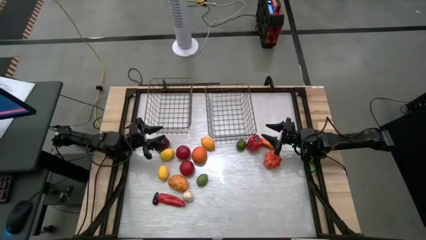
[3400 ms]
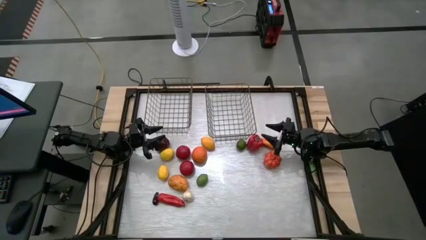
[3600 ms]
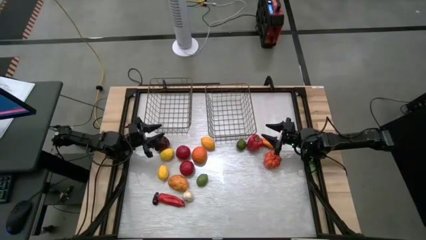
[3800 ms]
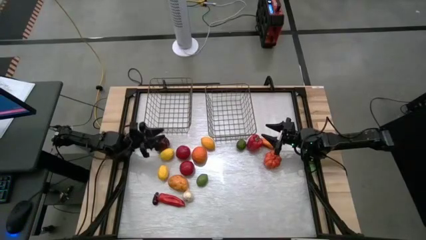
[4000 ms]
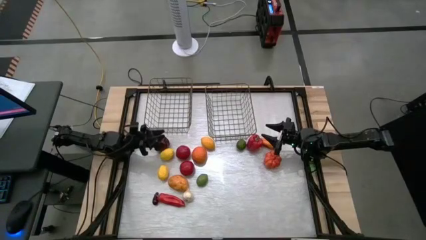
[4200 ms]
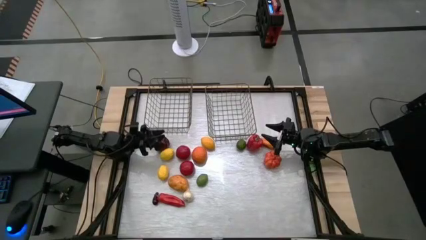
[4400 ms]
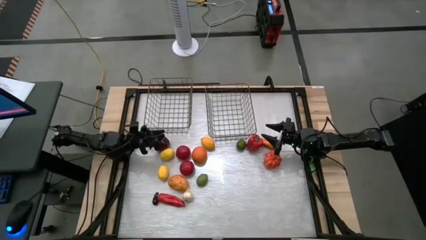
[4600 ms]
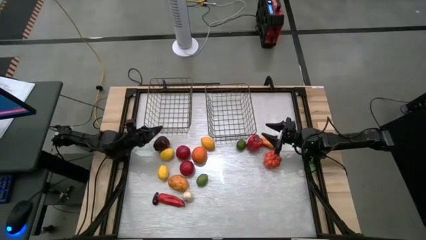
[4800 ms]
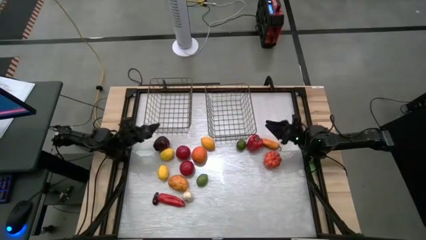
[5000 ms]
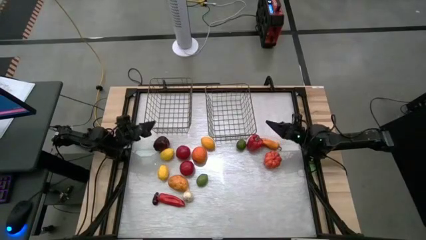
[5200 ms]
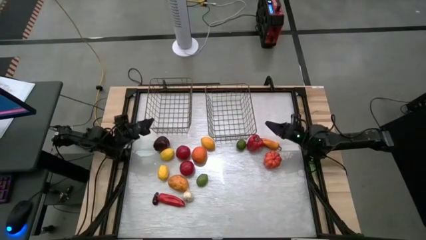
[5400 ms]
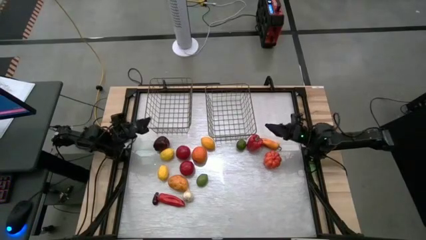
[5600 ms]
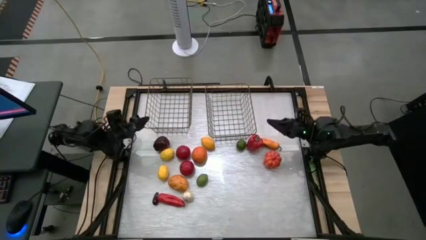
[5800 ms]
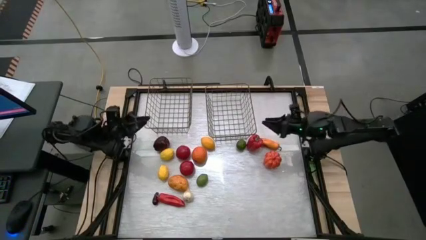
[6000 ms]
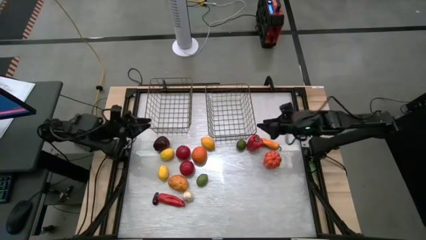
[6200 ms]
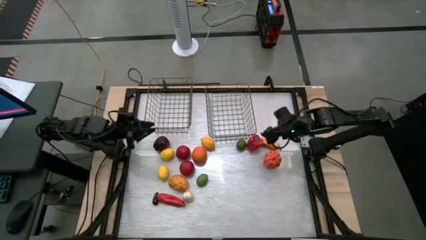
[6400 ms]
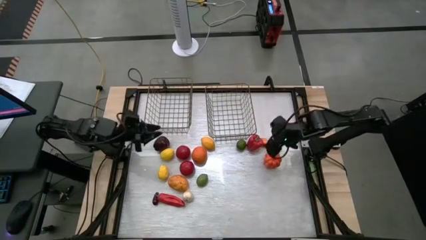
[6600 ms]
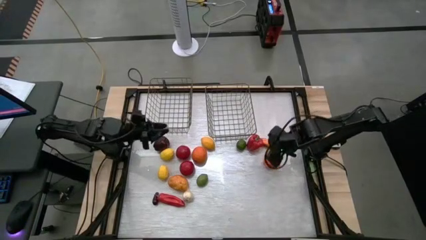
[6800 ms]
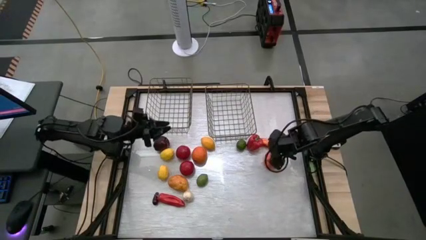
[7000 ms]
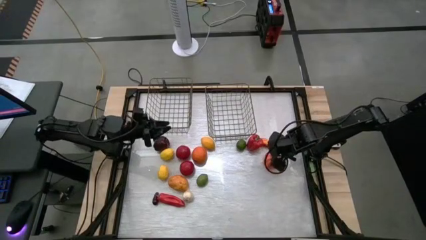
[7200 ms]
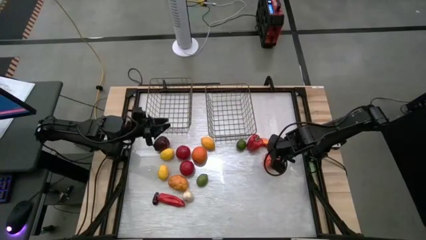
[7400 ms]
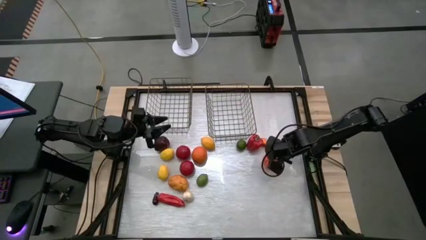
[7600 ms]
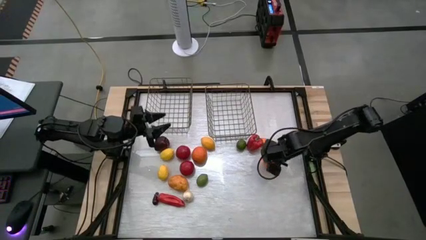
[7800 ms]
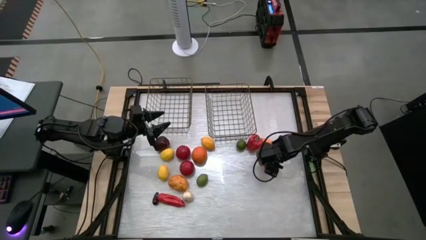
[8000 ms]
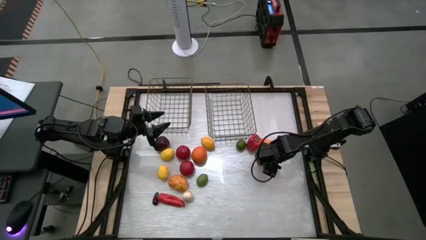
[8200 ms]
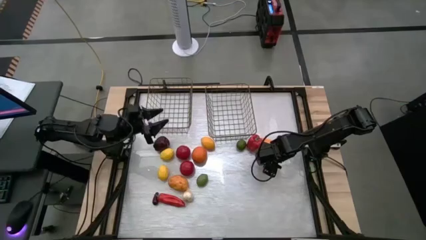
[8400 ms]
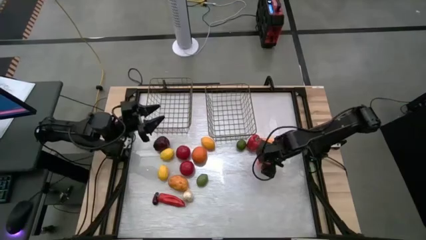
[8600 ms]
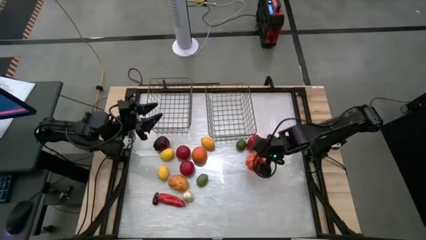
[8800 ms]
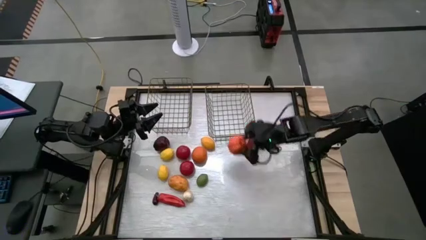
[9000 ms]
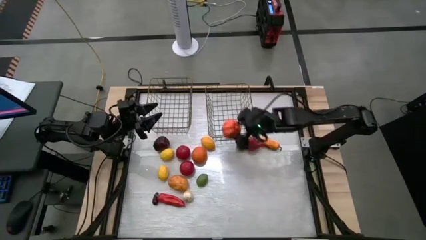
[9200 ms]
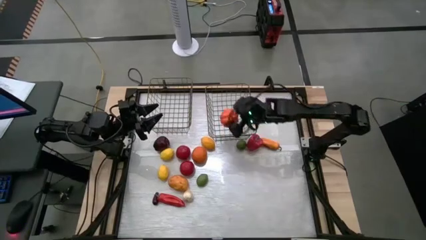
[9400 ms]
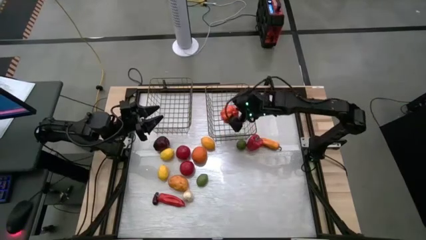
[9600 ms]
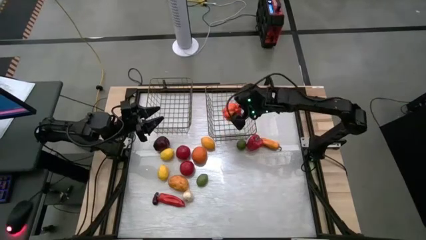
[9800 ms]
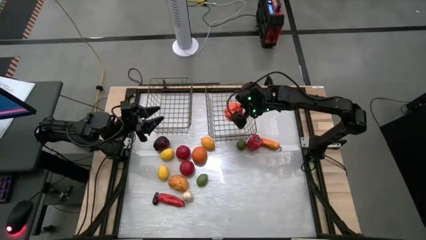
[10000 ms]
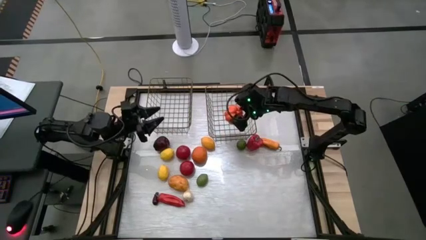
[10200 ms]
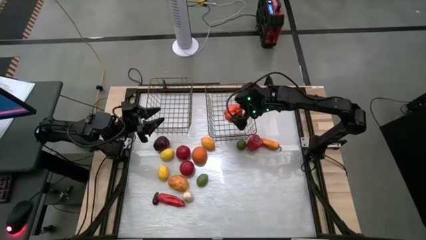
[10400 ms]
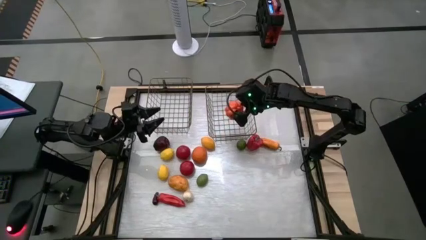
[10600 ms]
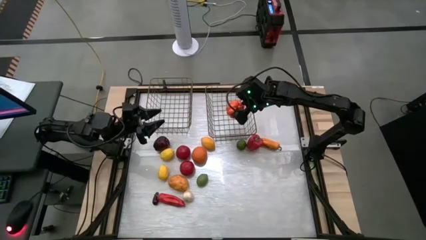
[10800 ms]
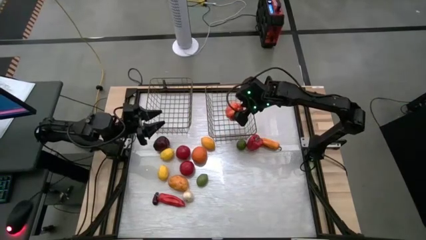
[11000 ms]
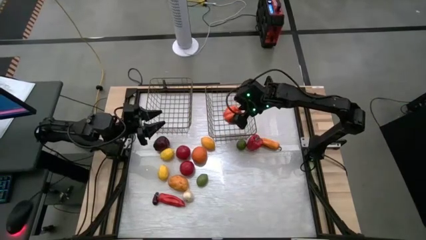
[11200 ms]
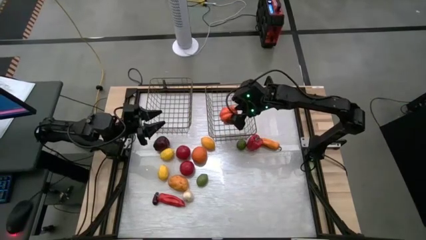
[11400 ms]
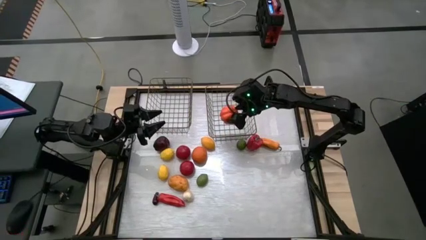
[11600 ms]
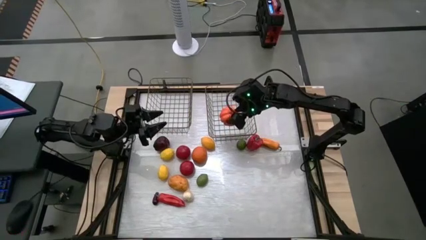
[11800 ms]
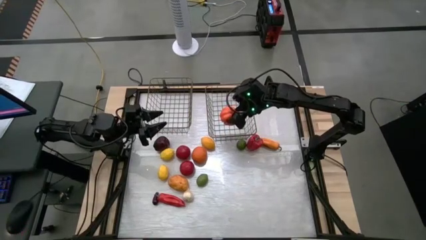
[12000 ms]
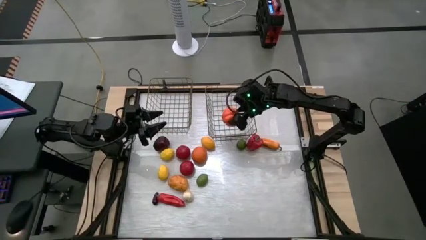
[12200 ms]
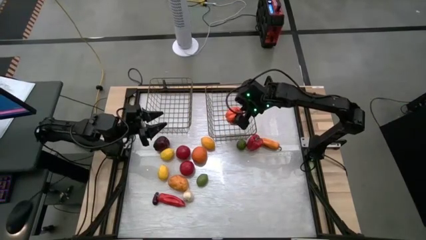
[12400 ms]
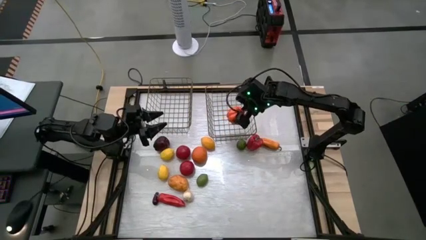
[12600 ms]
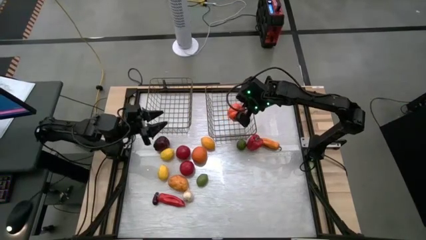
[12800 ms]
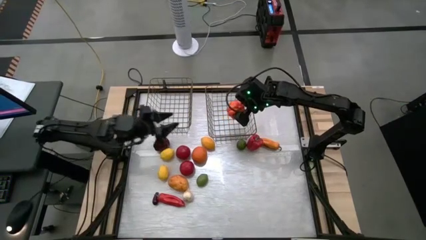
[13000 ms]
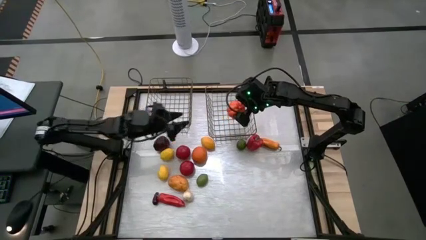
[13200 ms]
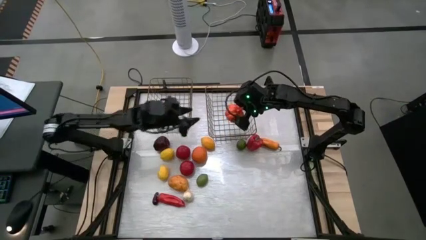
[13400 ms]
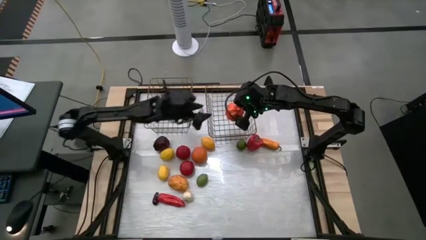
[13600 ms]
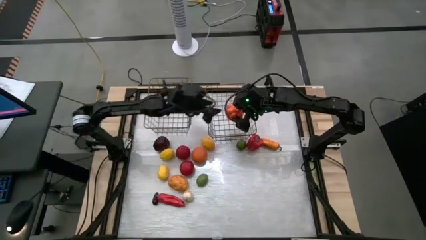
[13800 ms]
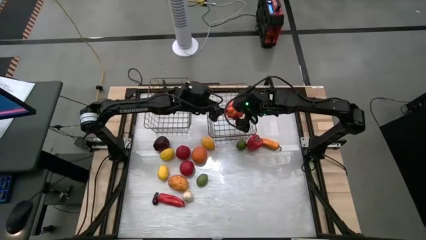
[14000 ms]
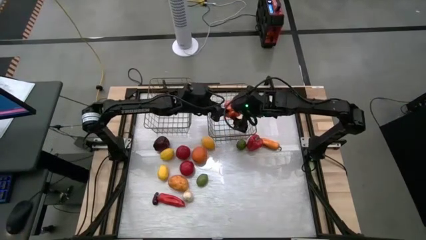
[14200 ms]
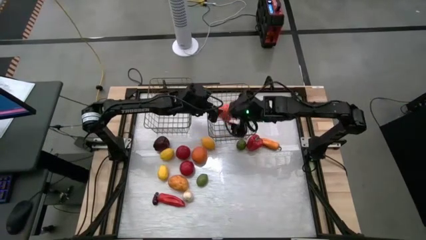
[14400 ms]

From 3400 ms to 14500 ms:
Task: Sort produce into baskets
Put the pumpkin into the right wire basket

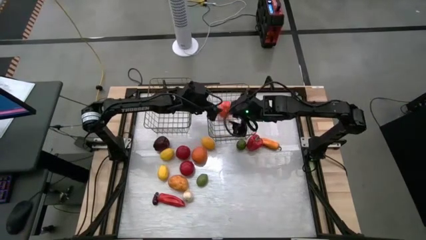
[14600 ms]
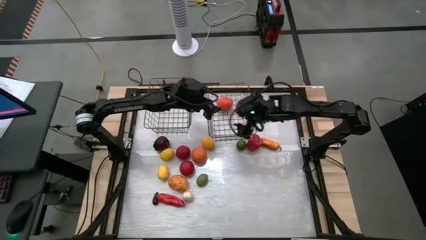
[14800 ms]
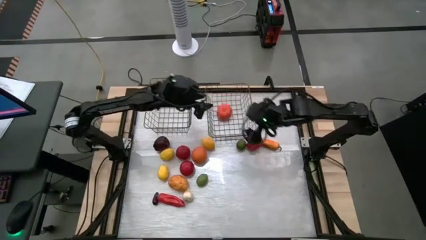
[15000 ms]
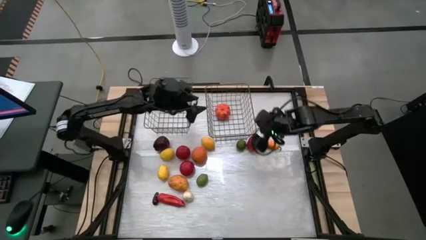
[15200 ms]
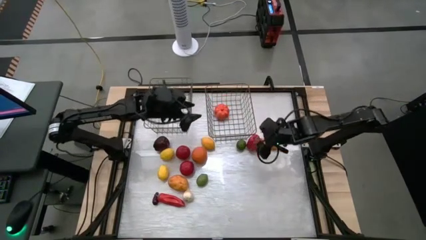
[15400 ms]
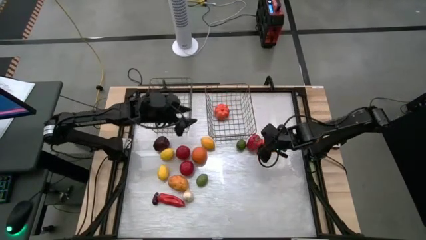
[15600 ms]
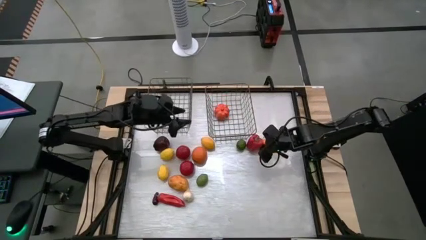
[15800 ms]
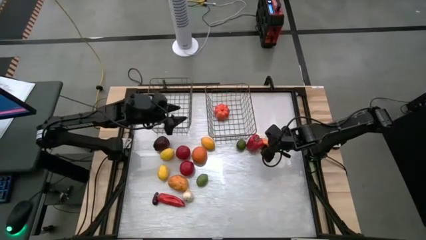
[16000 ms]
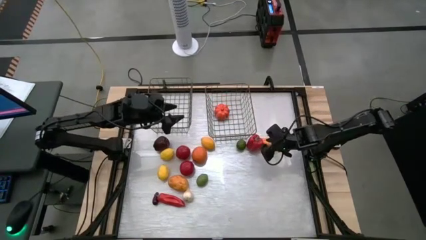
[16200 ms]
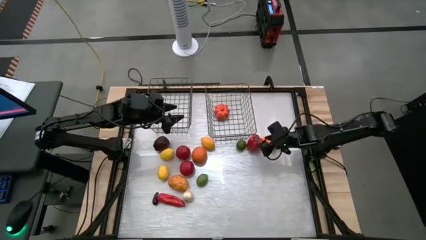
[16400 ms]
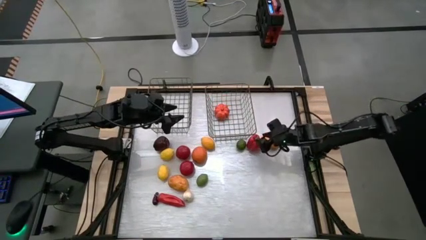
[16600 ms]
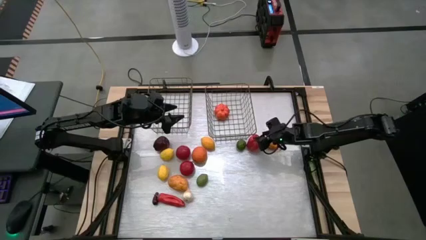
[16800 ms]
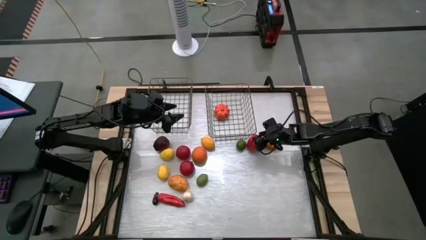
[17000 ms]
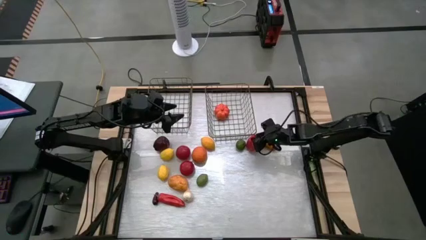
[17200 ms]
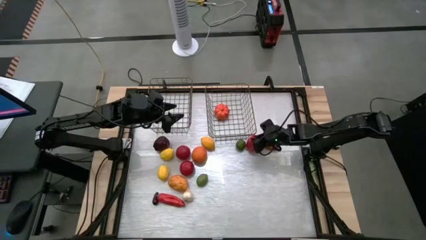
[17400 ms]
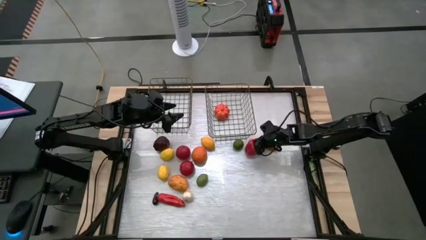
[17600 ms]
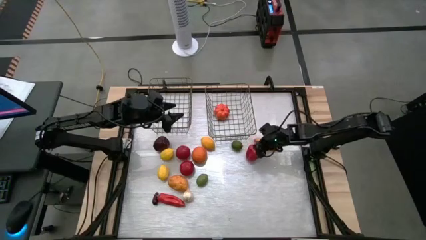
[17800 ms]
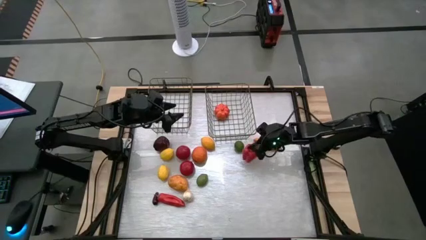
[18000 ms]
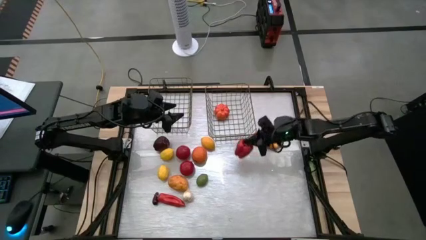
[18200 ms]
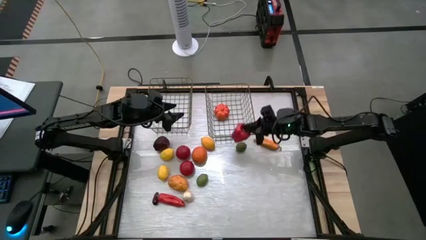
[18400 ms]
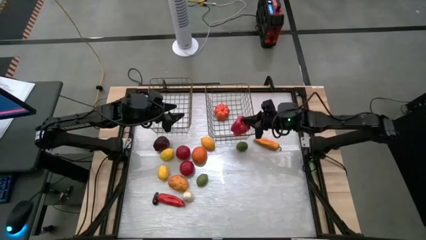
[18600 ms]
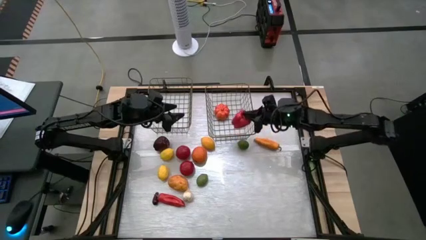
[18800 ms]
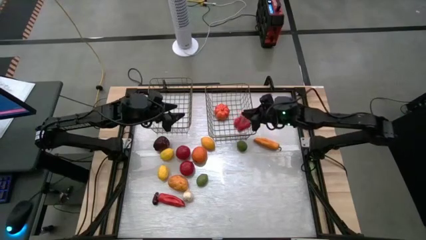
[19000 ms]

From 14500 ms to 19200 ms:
Put the bell pepper into the right wire basket
